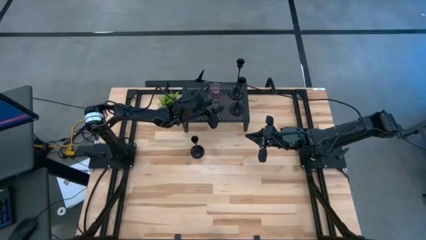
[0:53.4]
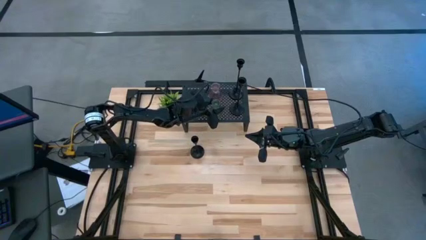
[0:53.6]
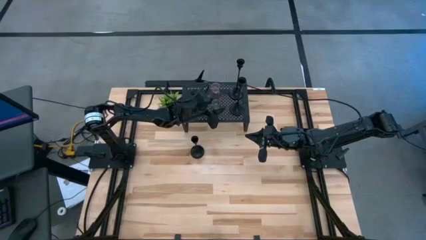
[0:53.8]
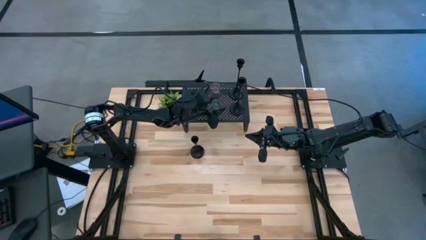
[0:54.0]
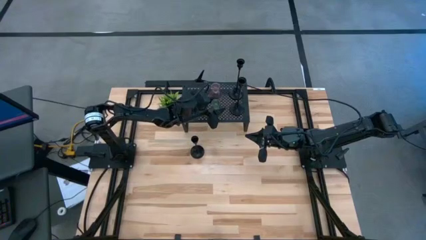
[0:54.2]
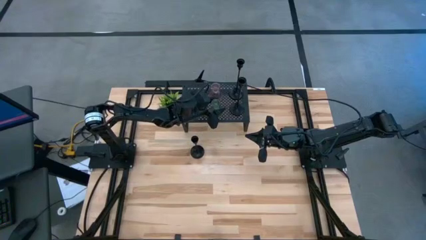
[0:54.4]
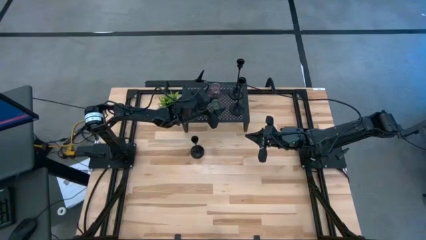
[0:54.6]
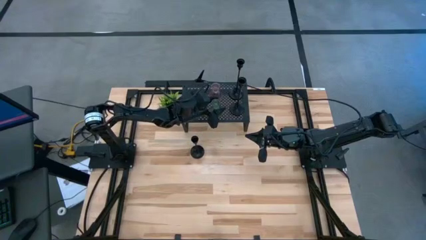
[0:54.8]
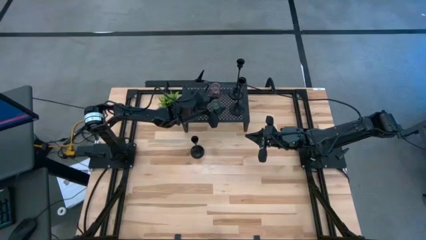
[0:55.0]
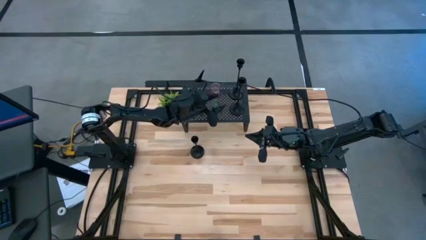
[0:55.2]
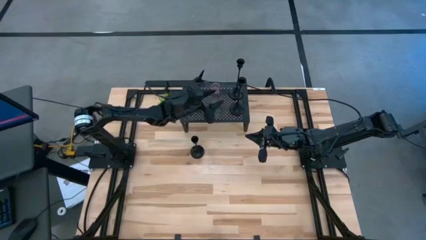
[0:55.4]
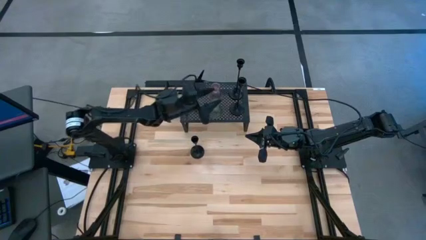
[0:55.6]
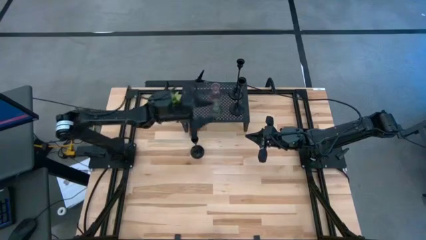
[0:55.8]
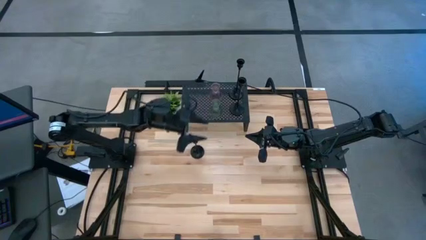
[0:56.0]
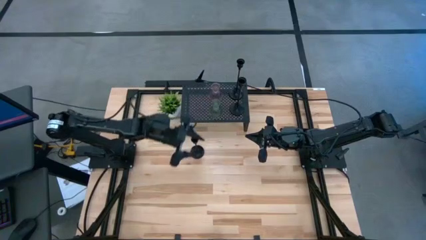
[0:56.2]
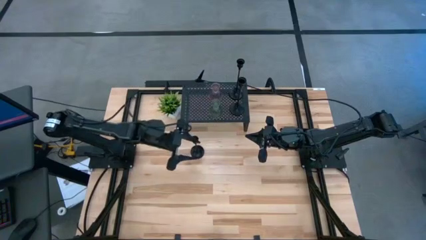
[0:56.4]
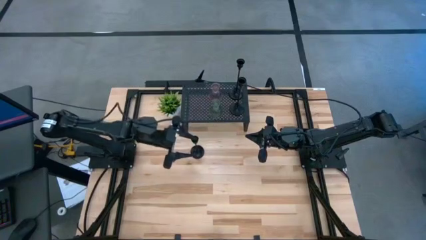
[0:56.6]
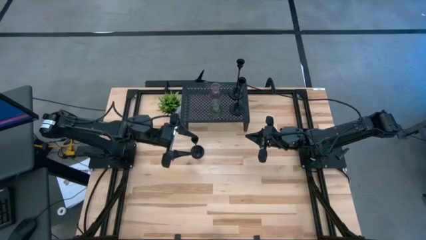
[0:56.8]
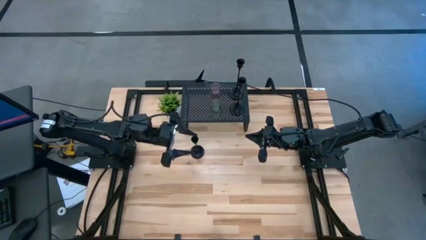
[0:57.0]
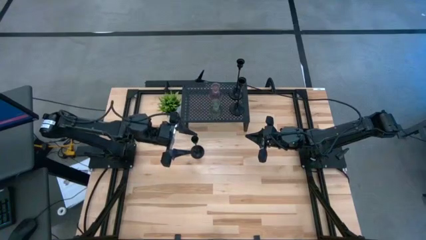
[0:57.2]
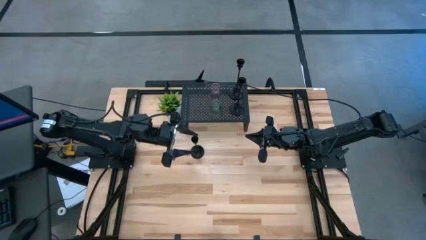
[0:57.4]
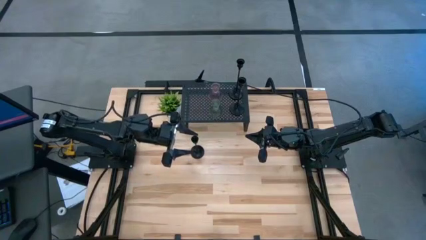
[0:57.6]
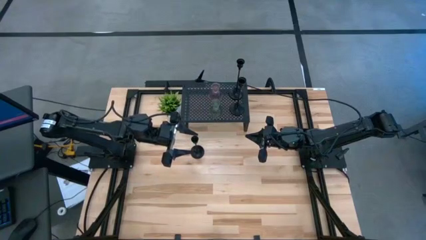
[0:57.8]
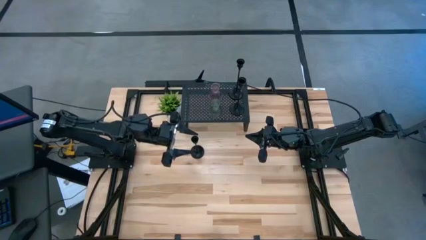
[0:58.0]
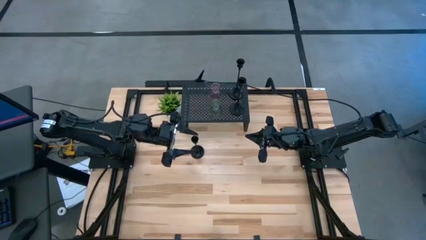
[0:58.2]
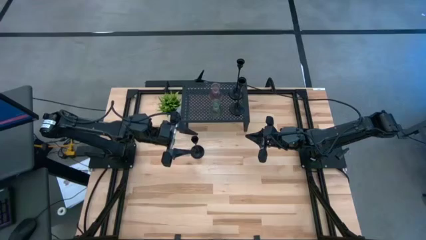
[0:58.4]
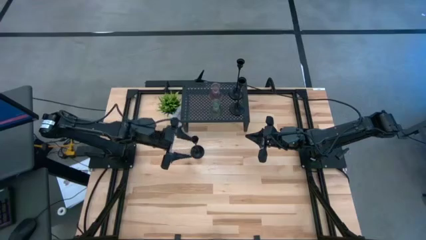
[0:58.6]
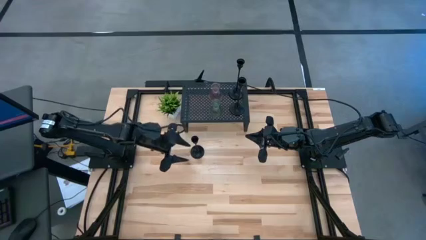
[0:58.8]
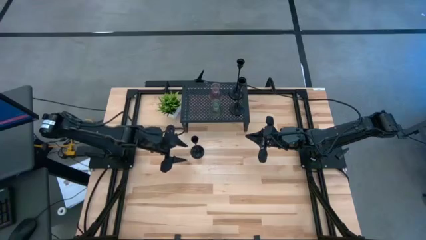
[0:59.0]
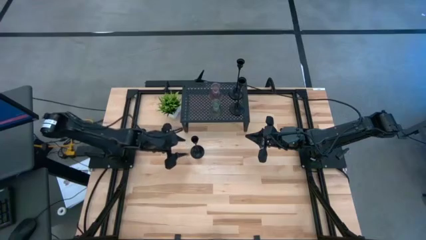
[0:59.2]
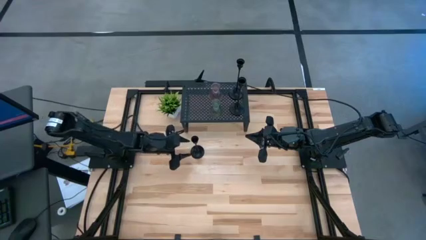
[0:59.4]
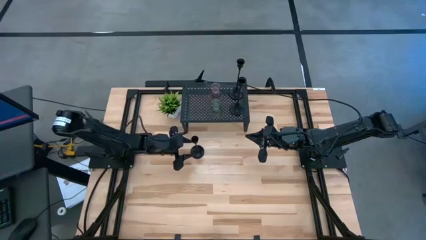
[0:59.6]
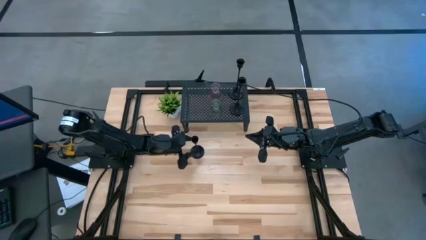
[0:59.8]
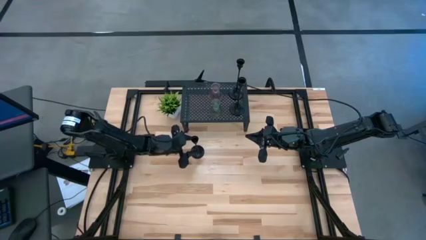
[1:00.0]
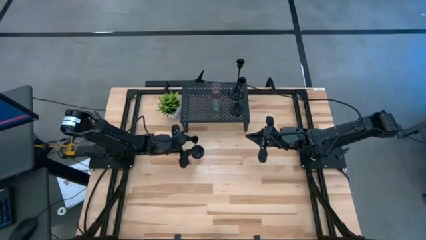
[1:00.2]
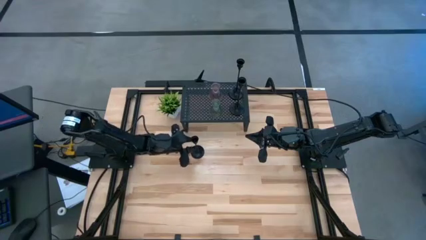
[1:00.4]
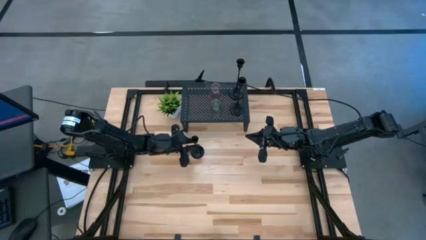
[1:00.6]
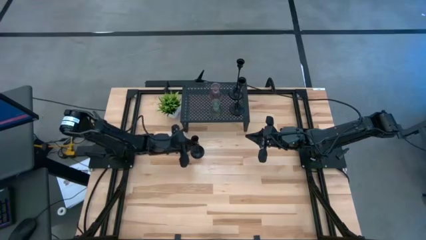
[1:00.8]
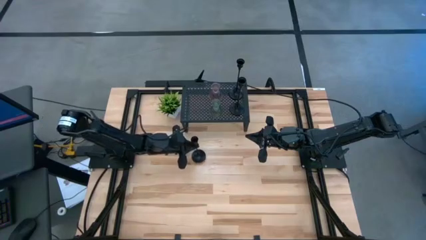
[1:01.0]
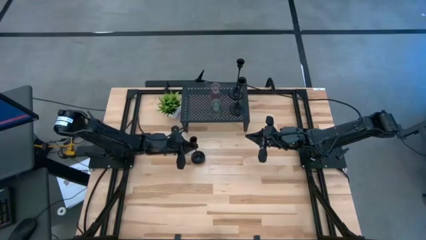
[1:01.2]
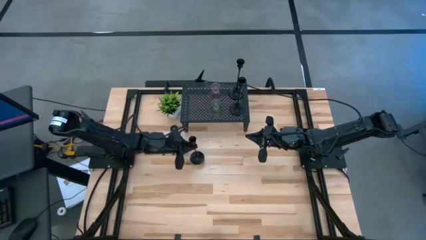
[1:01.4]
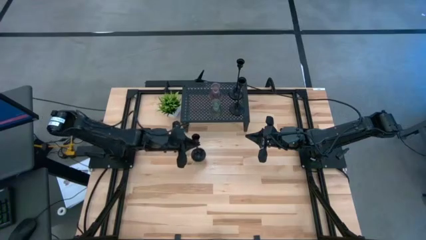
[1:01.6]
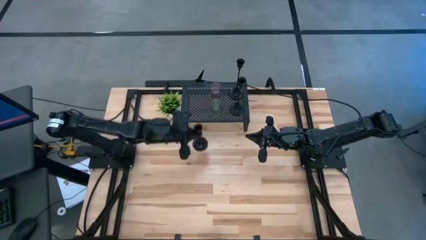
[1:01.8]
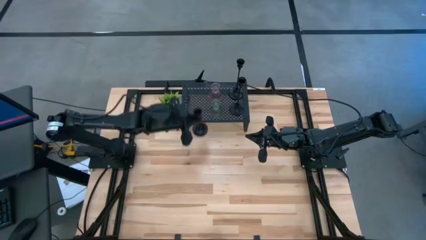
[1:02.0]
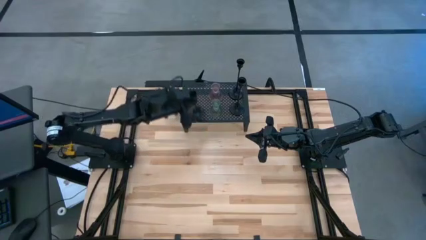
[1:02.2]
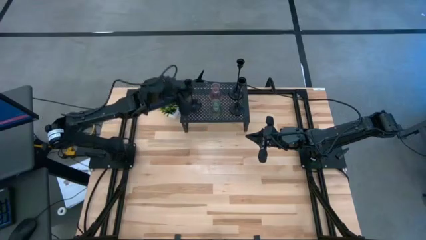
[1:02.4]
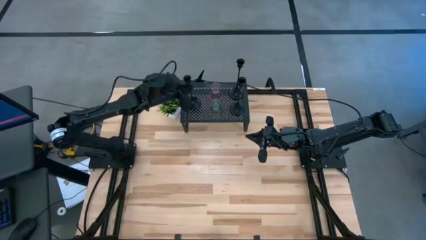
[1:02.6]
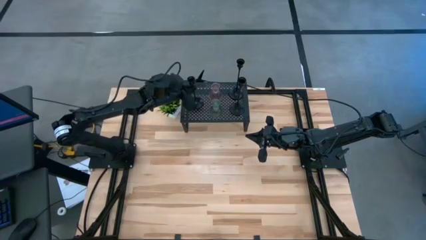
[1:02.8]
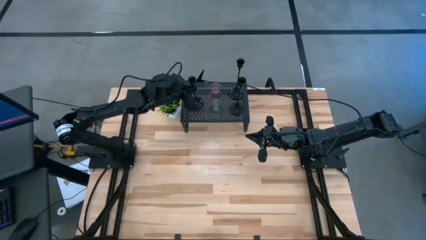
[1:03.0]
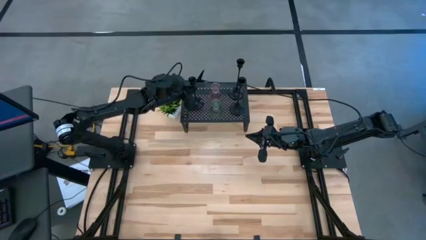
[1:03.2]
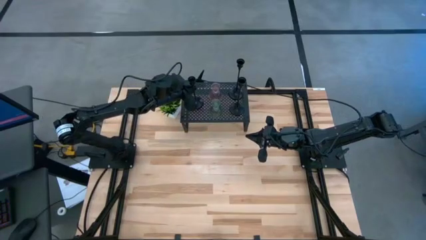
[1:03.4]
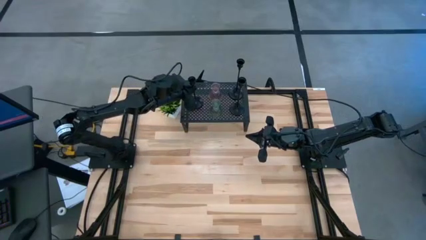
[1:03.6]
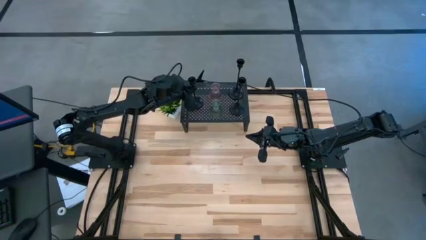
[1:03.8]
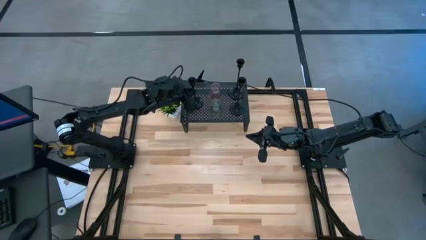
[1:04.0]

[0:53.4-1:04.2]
Task: Pick & Place candle stick holders
Put the black candle holder on the shelf

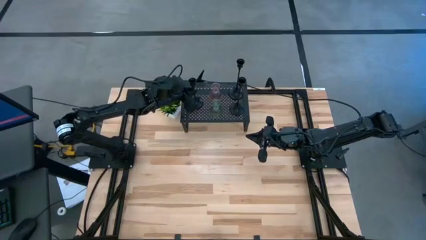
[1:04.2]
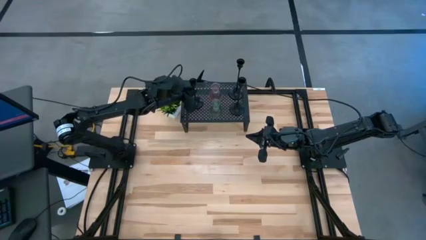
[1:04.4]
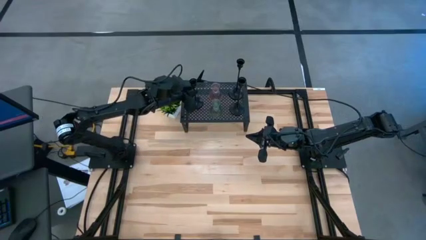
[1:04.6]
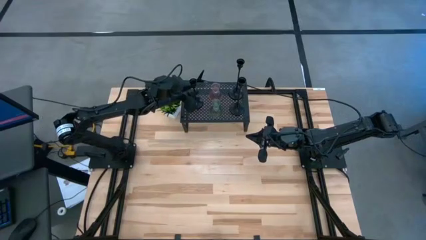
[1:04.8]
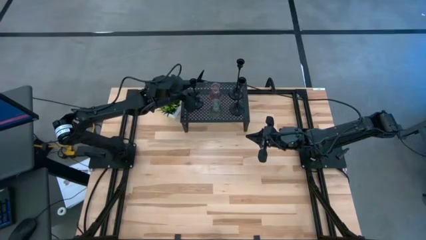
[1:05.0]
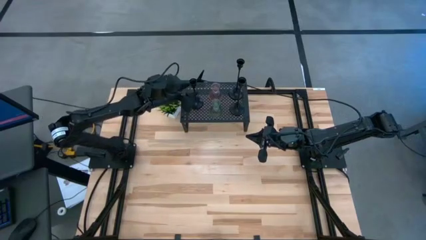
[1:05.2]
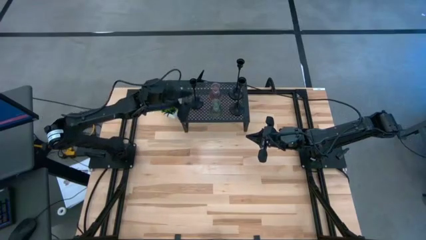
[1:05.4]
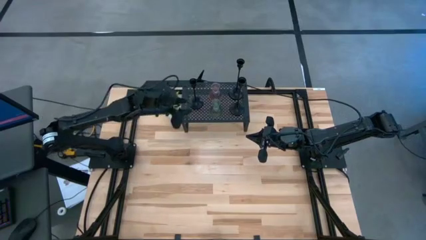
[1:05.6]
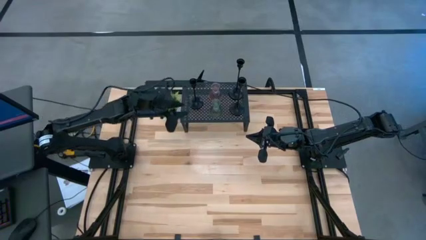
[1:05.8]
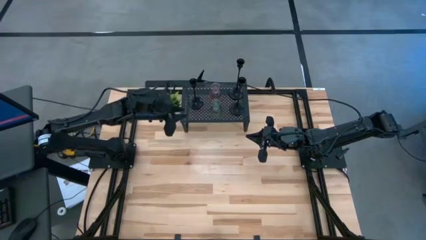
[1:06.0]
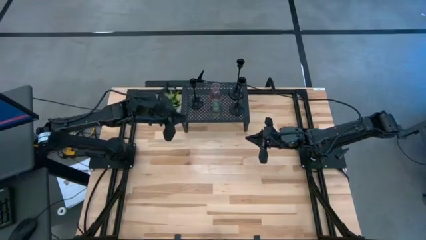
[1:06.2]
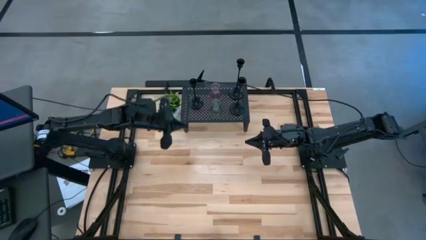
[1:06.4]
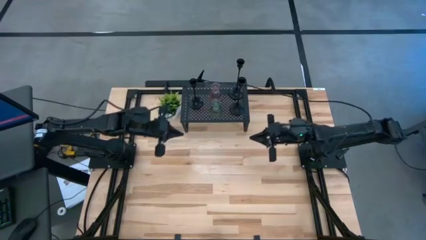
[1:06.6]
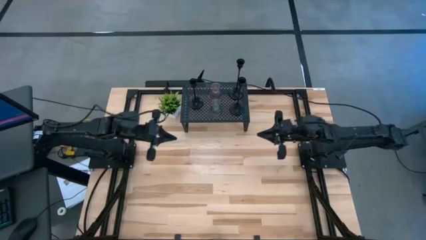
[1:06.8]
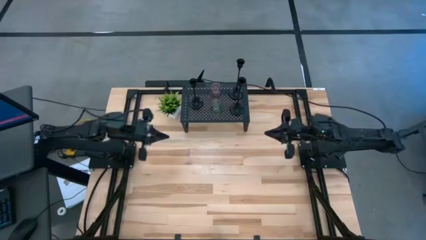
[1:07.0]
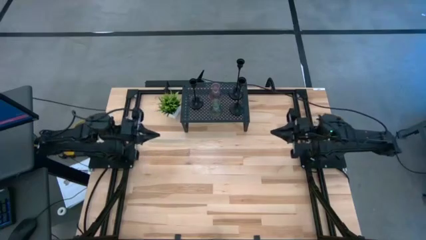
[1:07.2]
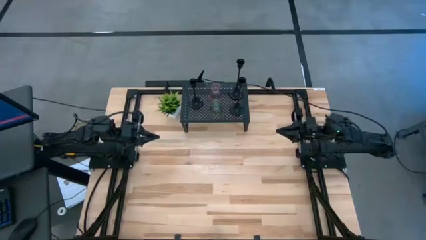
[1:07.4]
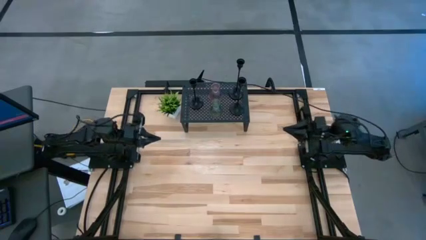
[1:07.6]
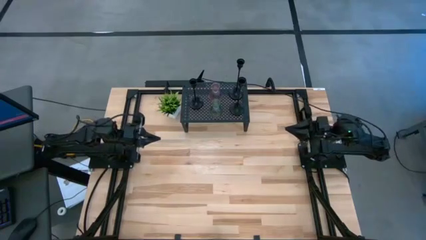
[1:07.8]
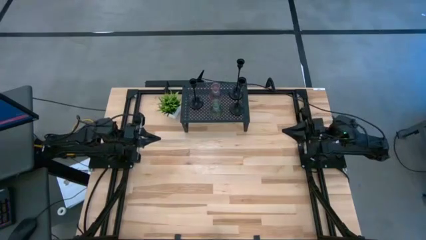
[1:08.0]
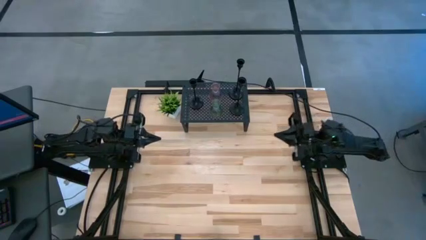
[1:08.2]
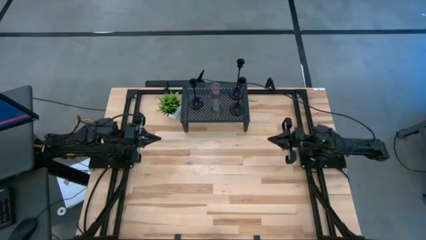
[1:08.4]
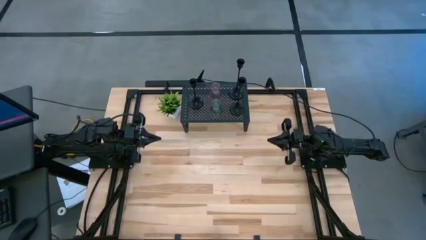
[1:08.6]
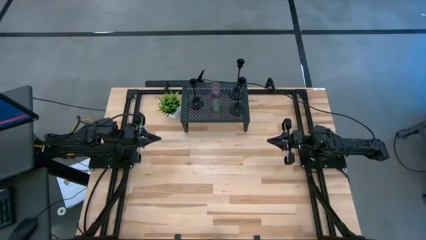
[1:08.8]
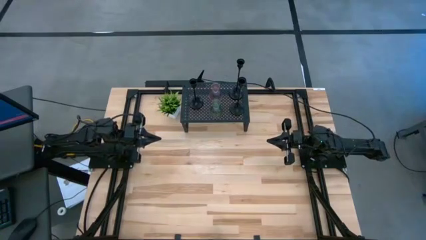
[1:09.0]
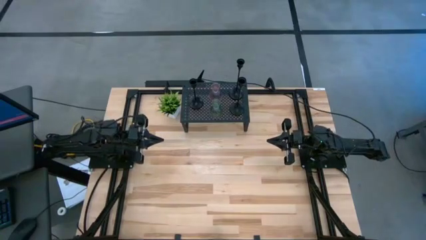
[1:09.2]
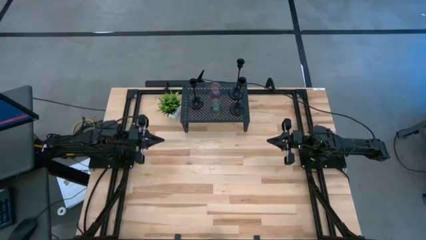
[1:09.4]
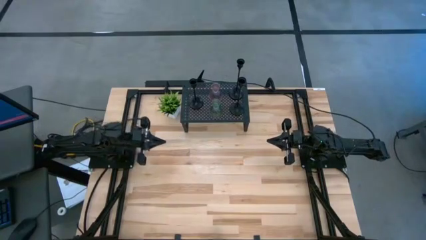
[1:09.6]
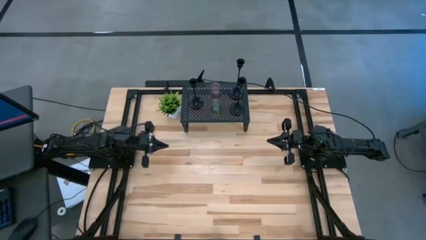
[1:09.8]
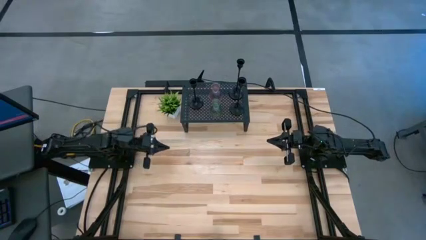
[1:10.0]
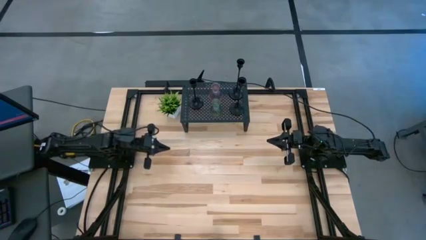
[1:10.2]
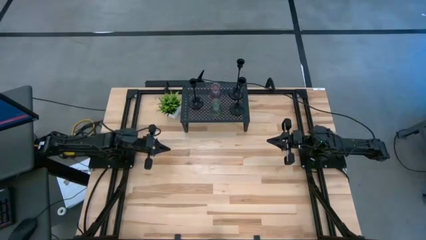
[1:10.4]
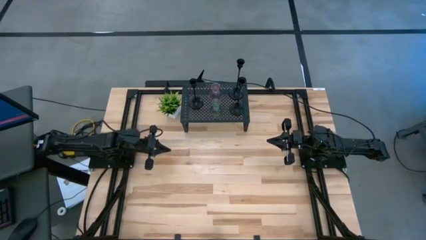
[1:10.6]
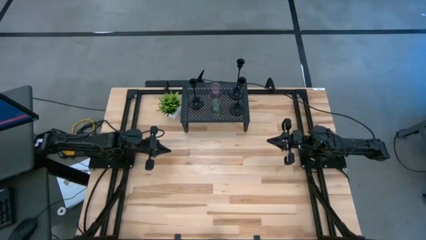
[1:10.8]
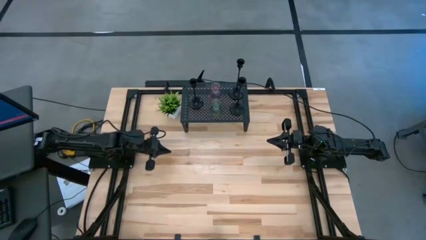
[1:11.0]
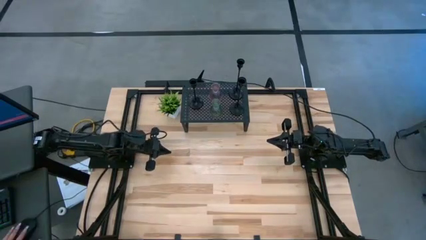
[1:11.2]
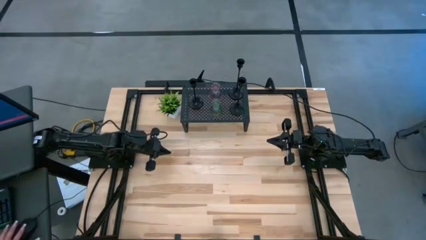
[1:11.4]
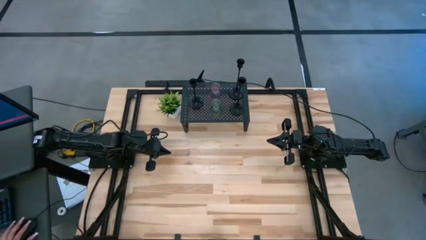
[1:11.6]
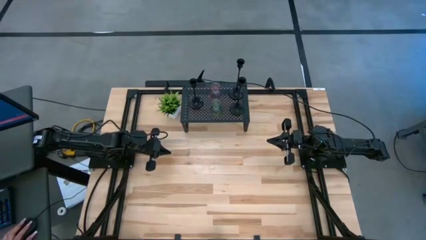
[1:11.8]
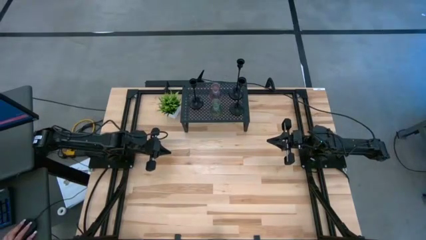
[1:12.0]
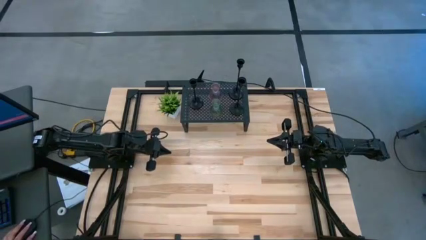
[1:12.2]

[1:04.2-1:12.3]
Return to Home Position
